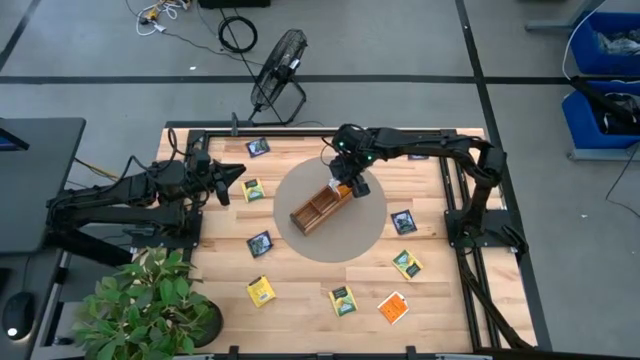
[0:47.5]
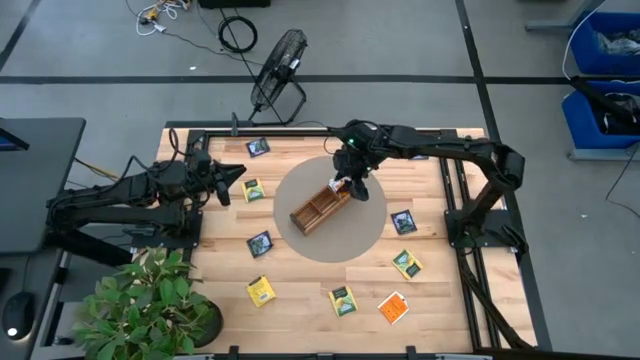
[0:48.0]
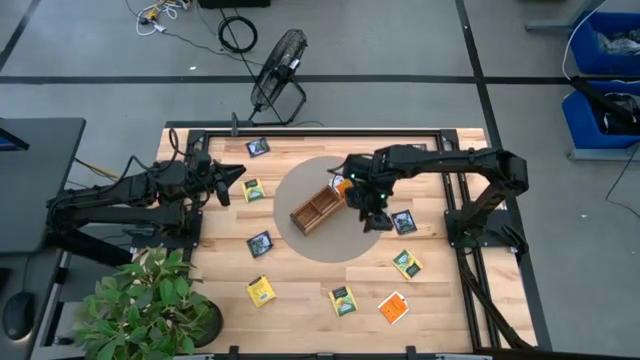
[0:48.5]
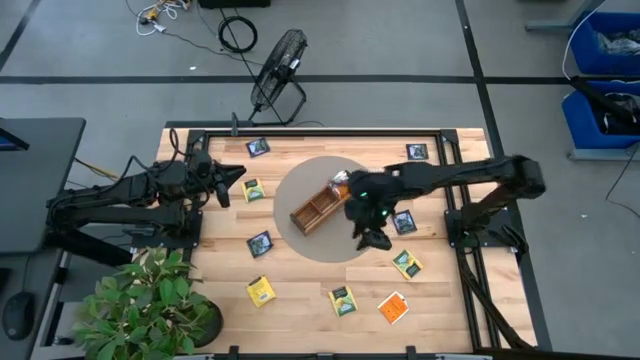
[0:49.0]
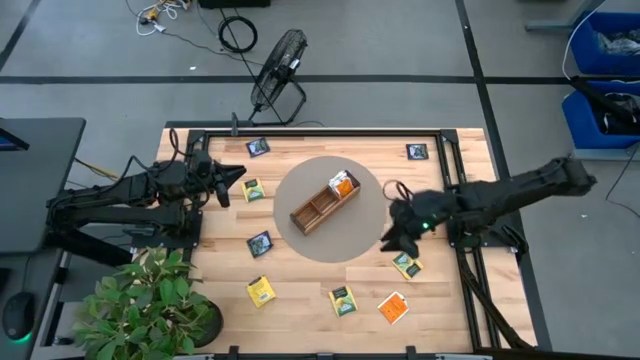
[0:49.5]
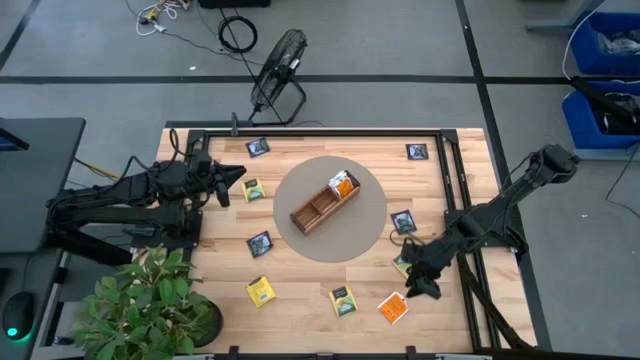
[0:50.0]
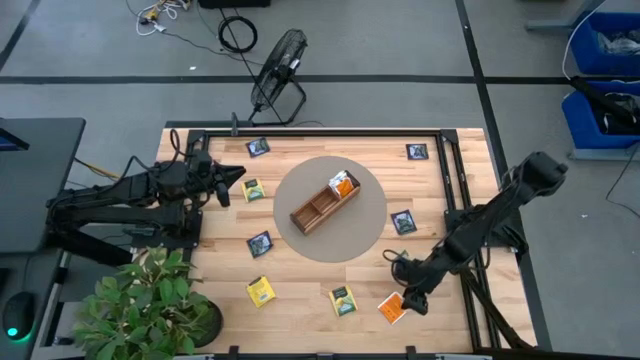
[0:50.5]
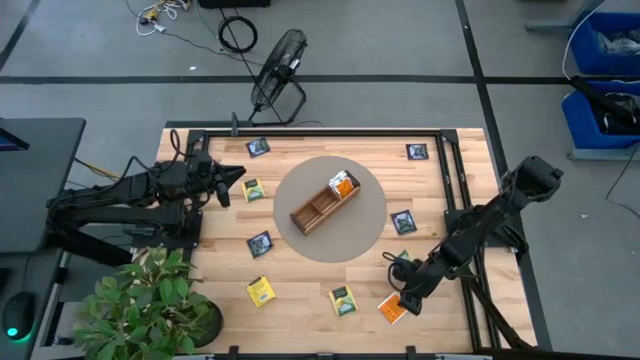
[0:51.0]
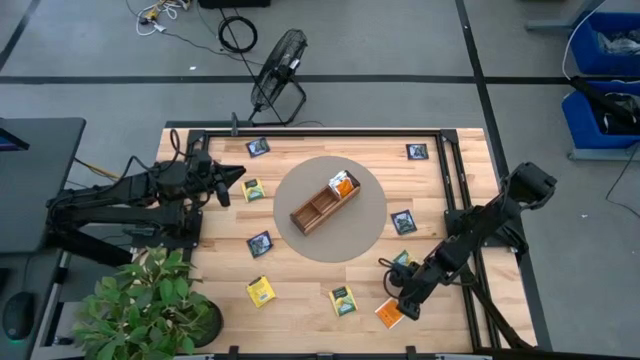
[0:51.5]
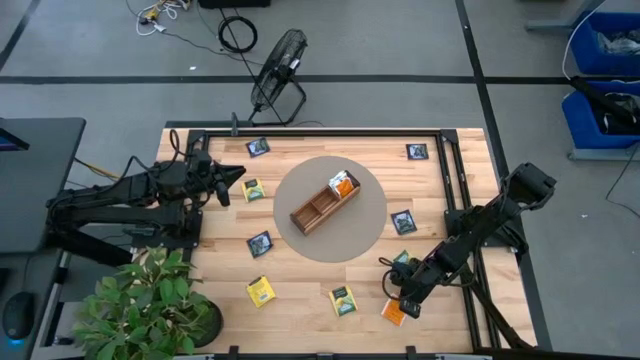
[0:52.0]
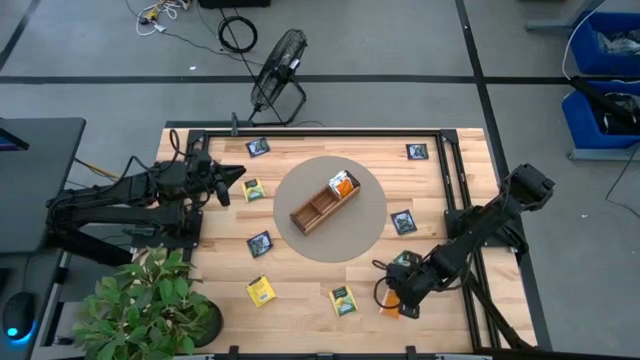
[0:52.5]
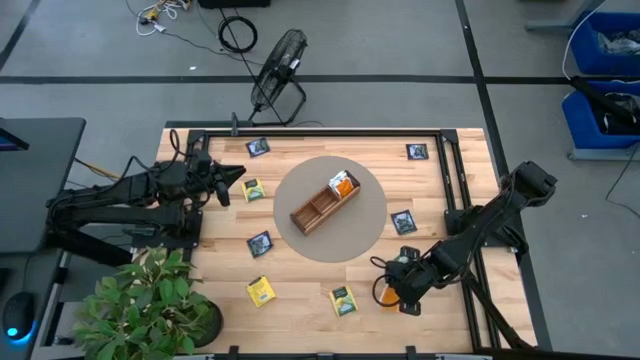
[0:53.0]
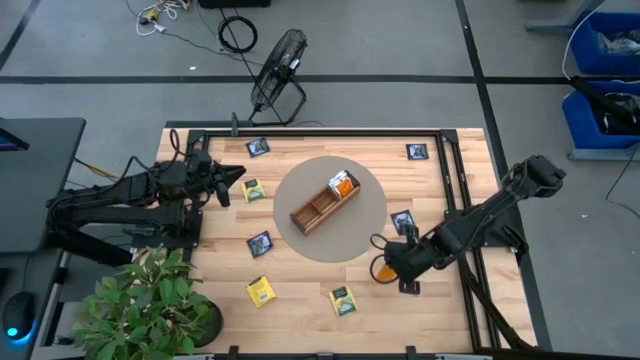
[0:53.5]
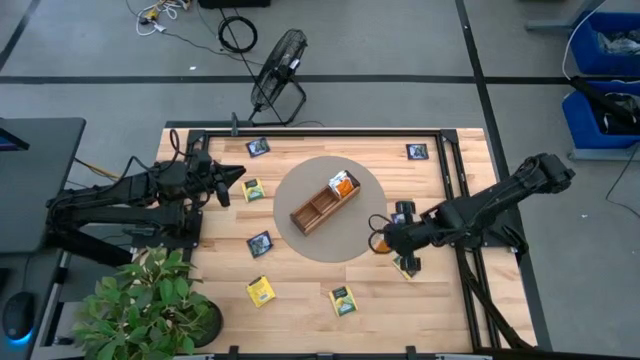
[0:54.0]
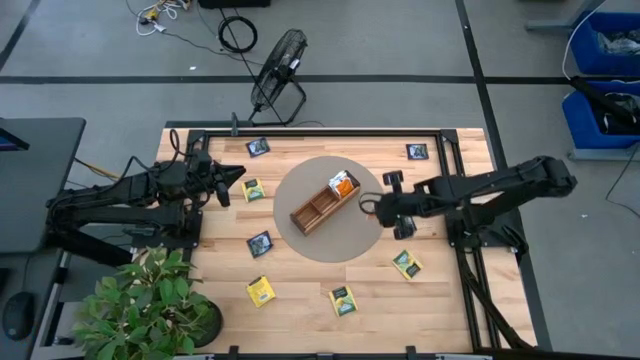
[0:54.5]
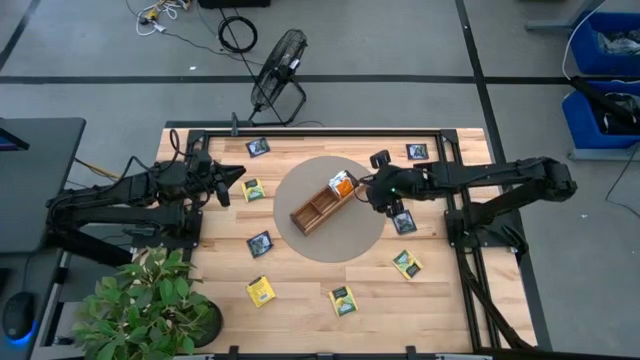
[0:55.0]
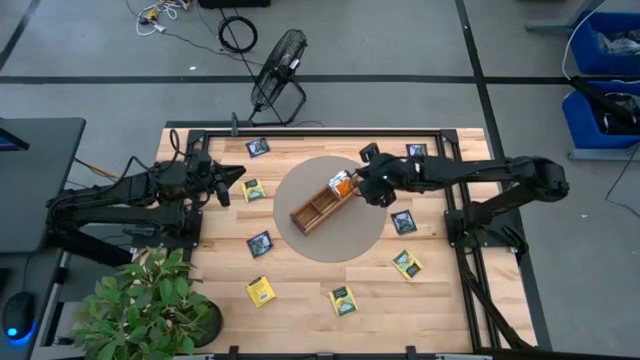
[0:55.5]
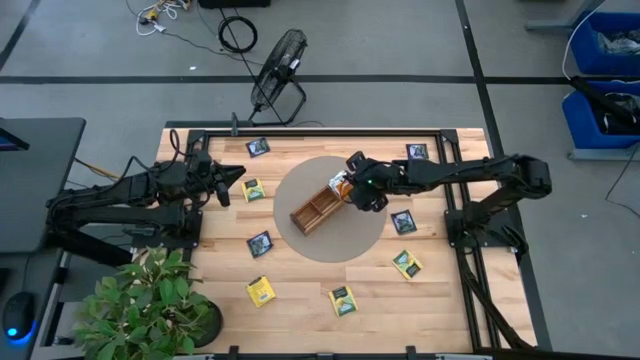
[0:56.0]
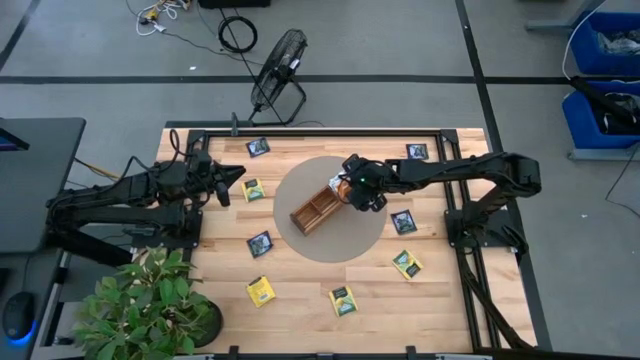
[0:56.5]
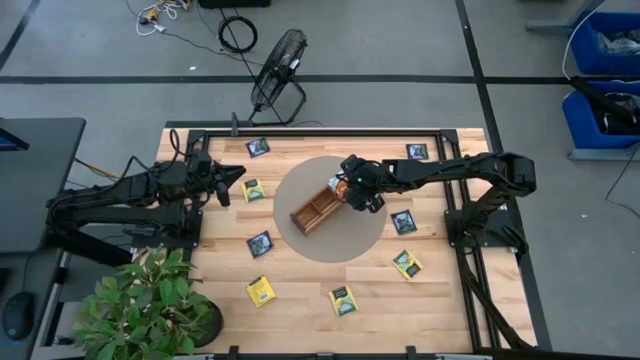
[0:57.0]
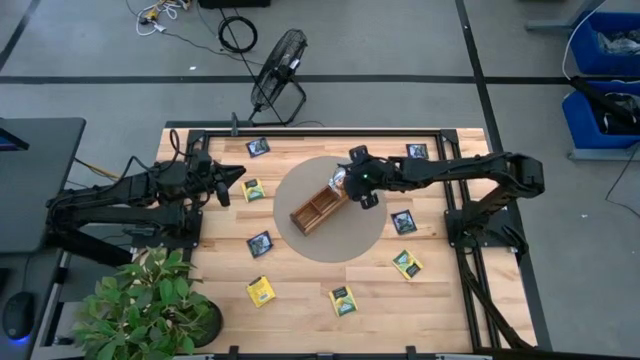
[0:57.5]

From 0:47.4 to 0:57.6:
Task: Pick & Place Tea
Put the orange tea bag into the right section of the wooden organizer

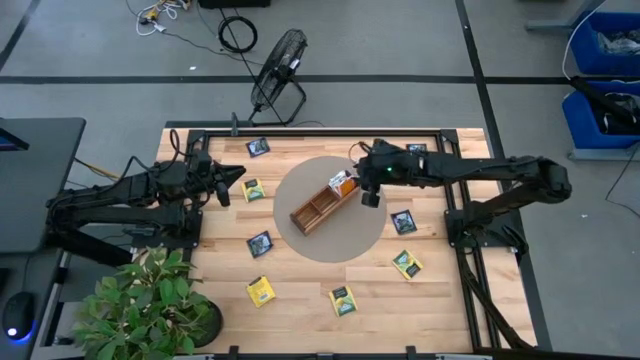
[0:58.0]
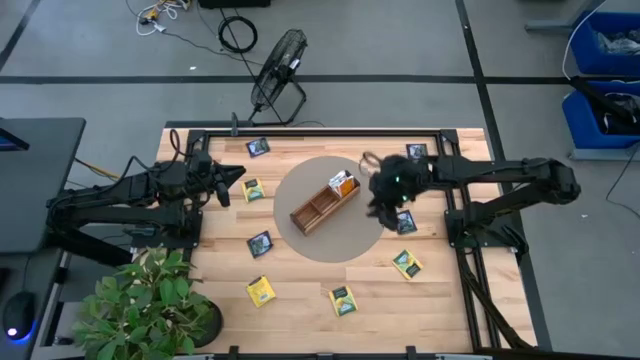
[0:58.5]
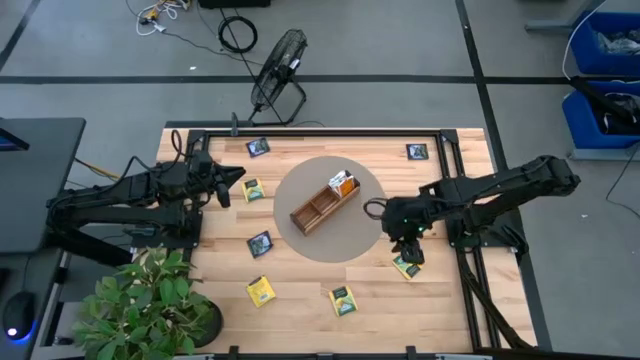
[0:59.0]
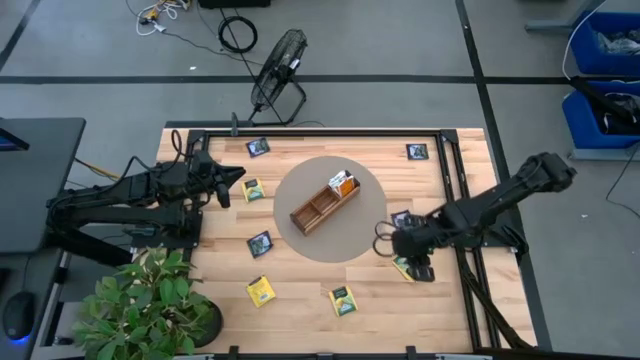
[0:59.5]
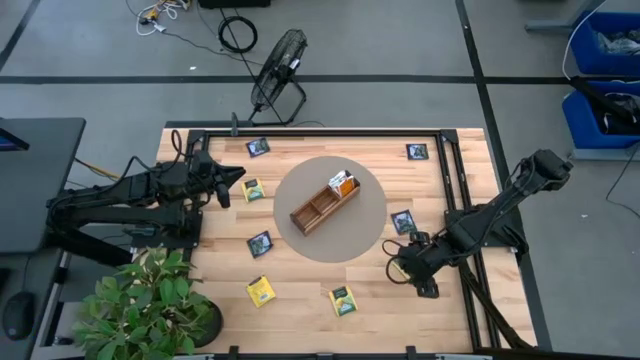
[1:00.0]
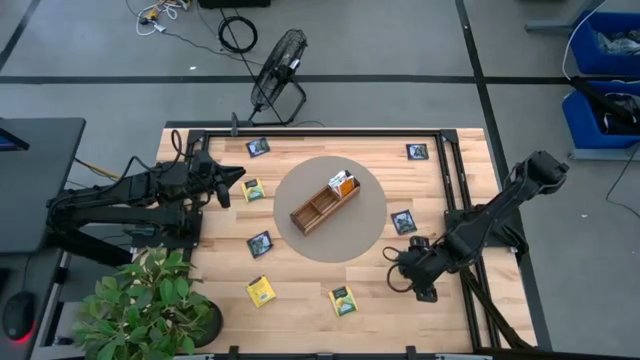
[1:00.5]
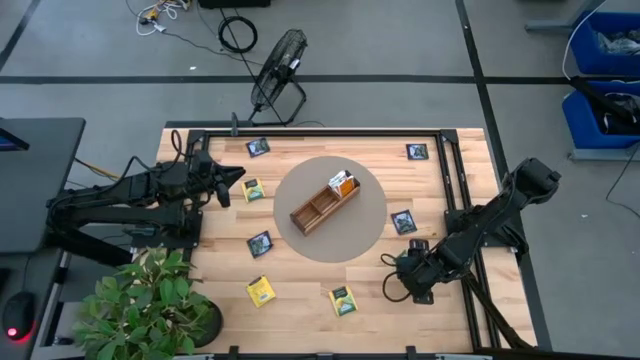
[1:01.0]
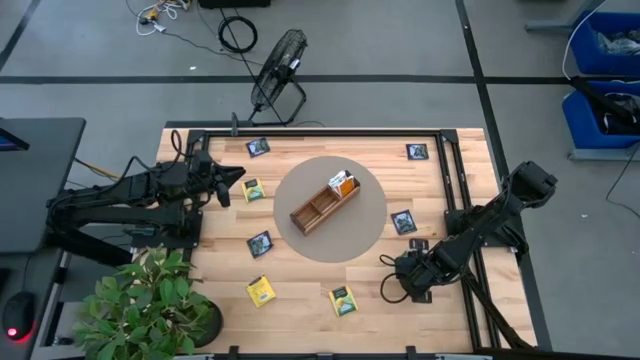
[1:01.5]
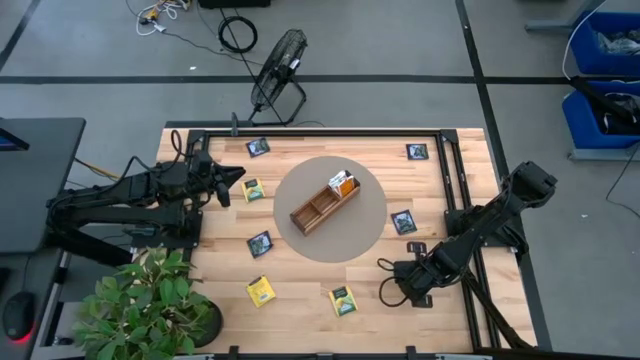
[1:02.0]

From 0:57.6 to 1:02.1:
Put the yellow tea bag into the middle section of the wooden organizer

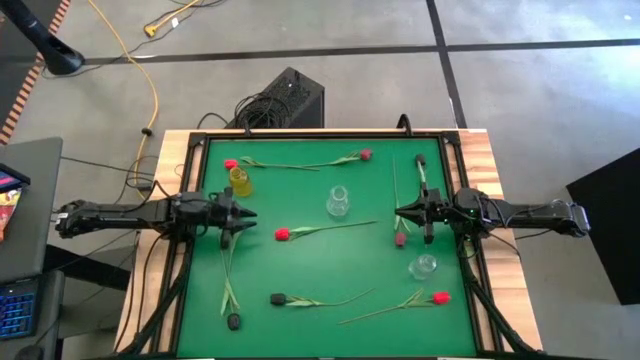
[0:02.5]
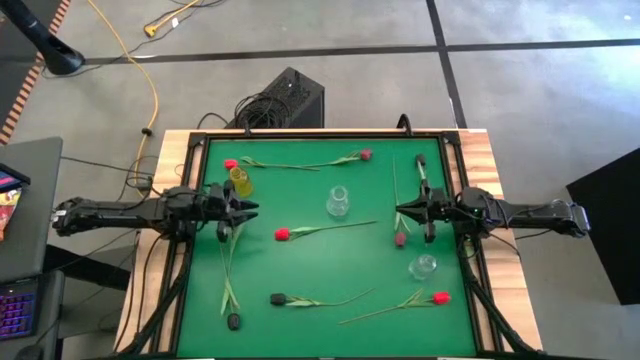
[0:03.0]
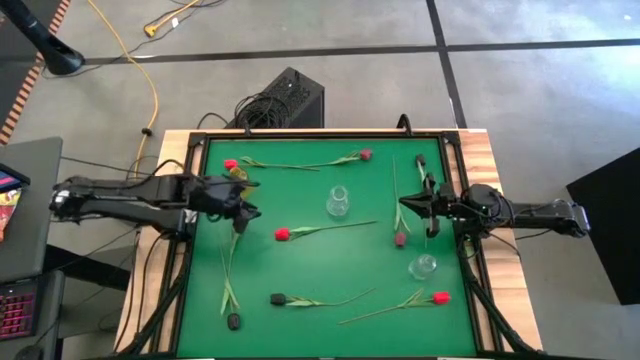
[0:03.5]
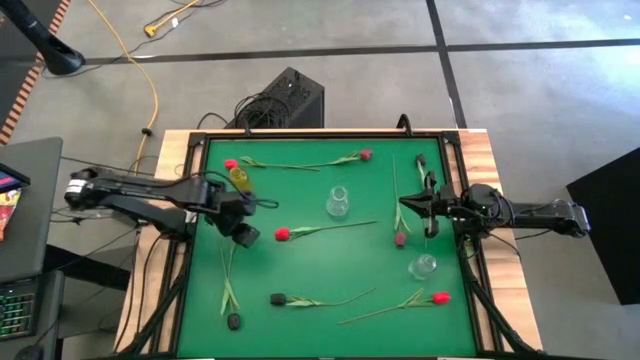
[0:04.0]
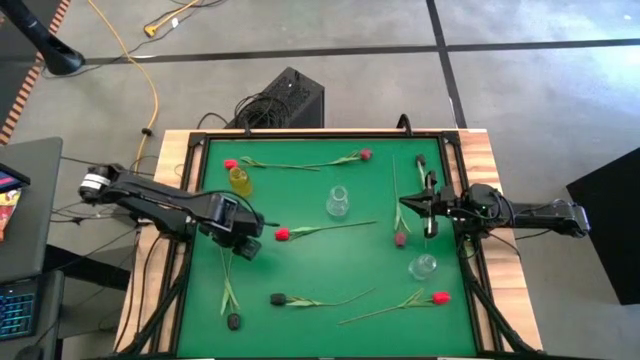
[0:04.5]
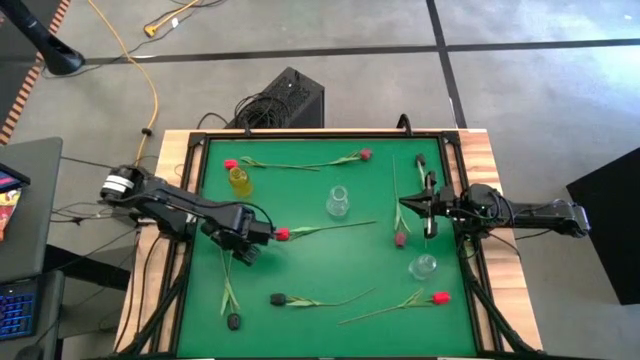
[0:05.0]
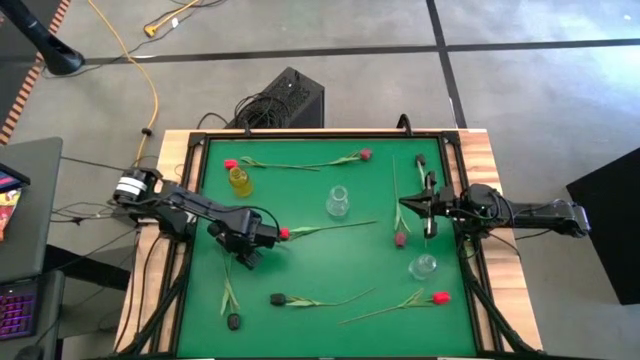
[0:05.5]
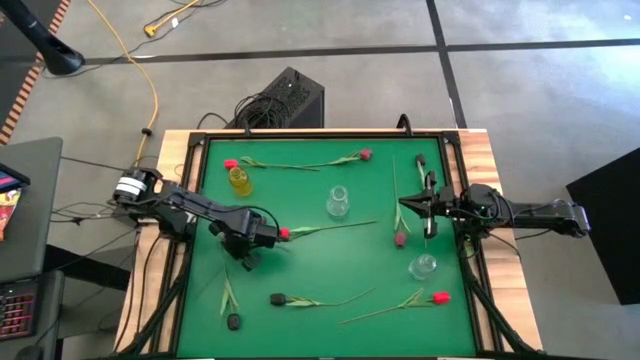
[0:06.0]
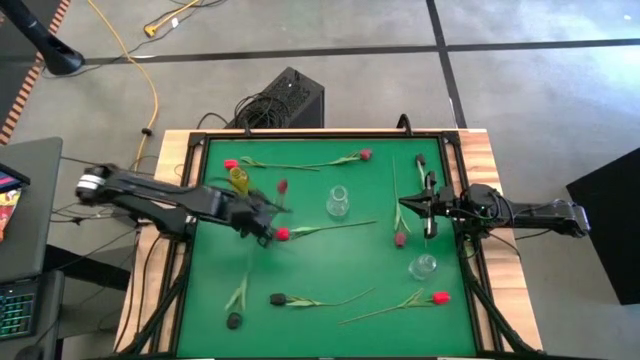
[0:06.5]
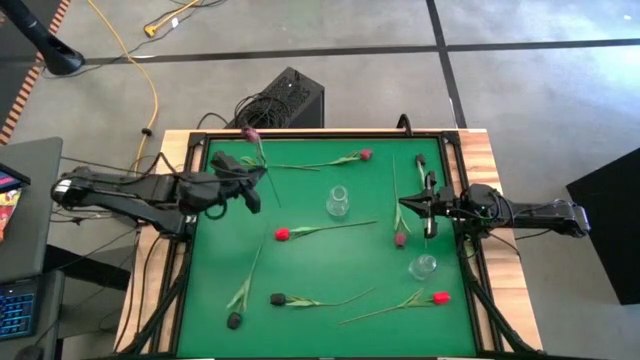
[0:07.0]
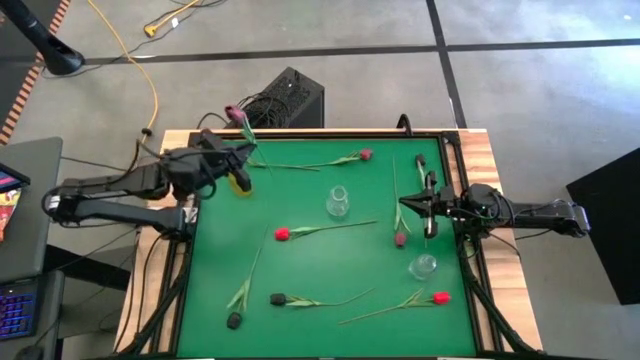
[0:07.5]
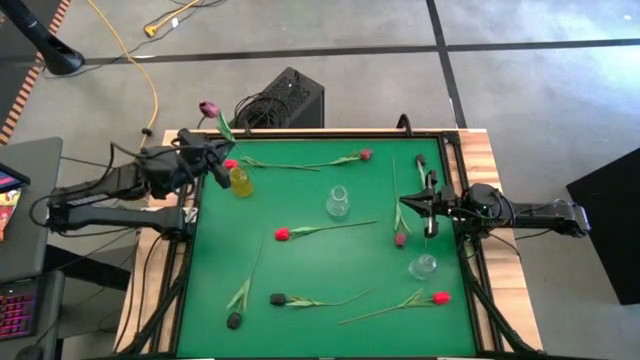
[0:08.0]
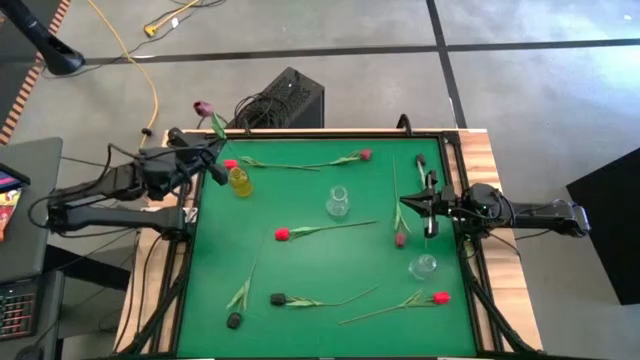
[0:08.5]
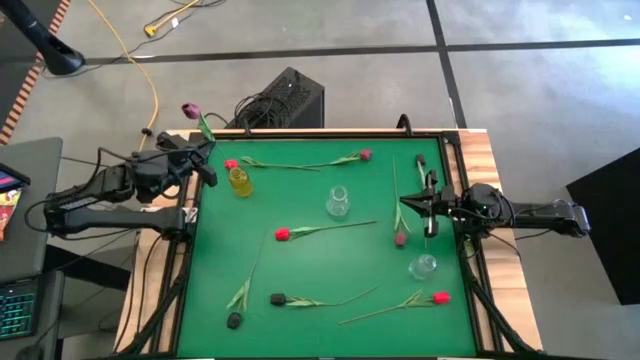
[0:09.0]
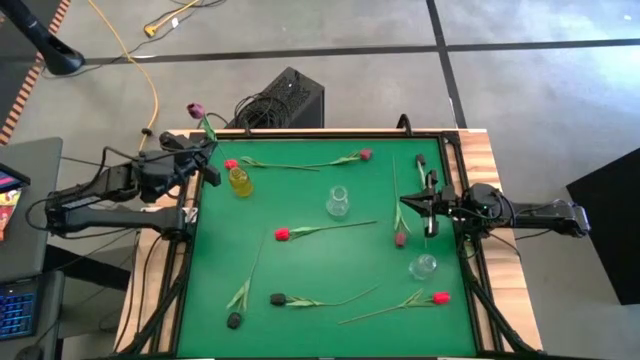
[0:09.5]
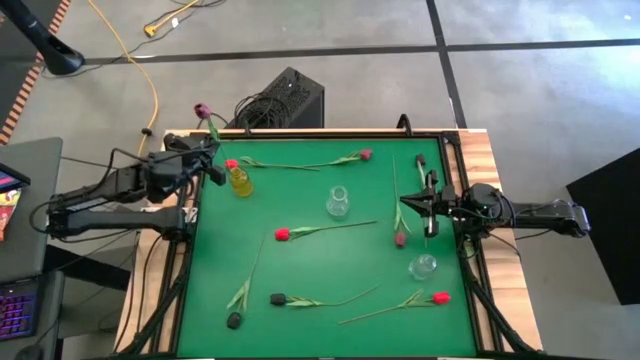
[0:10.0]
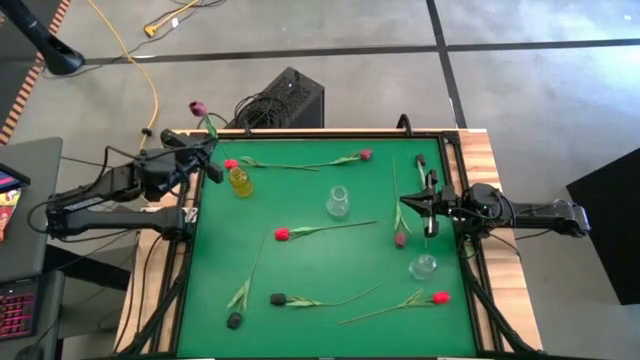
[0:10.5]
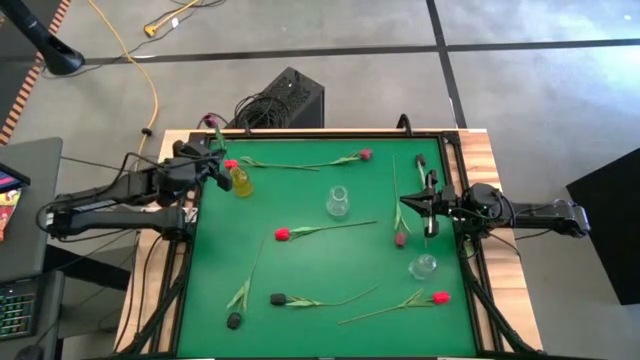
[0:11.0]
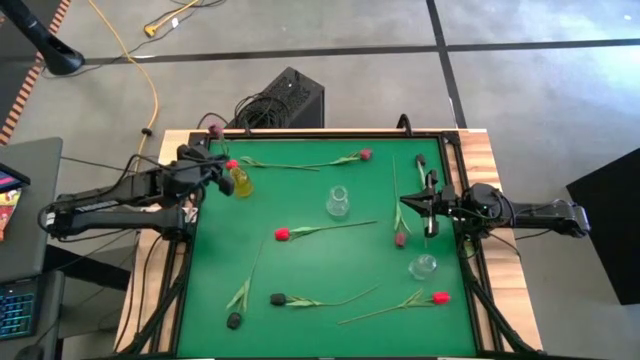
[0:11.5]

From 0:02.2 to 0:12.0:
Task: Sort flowers into vase by color
Put the left dark red flower into the yellow vase
